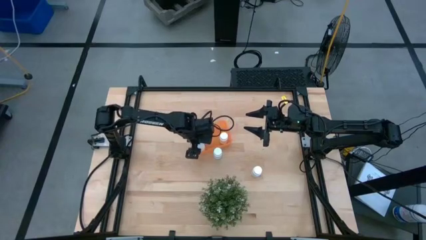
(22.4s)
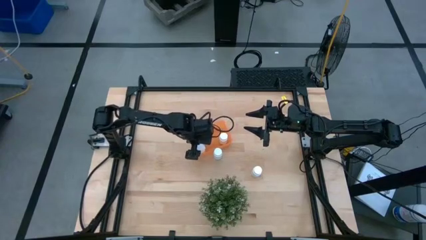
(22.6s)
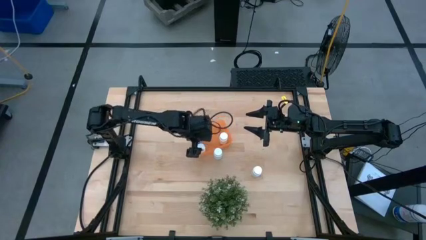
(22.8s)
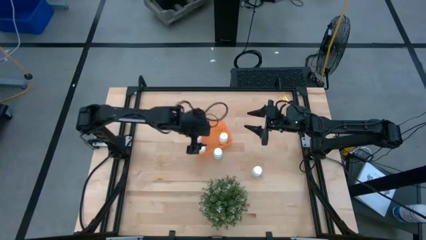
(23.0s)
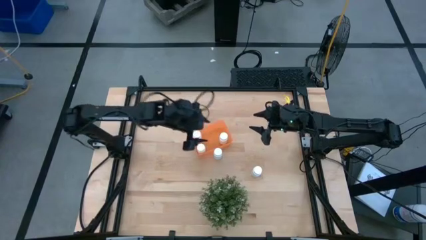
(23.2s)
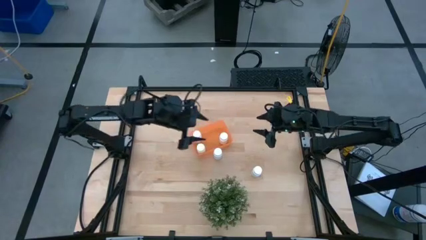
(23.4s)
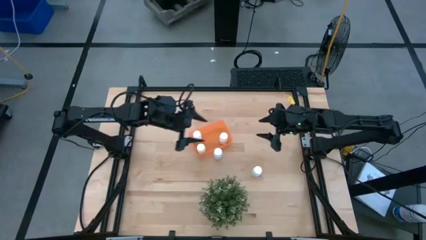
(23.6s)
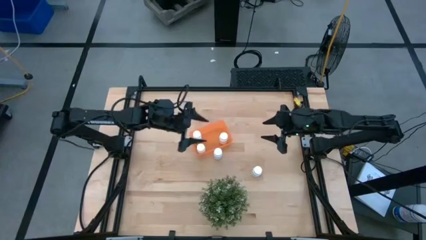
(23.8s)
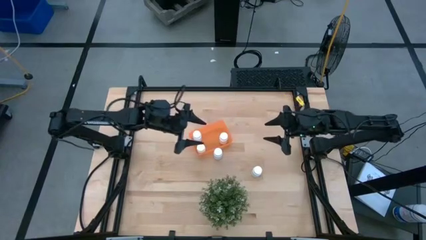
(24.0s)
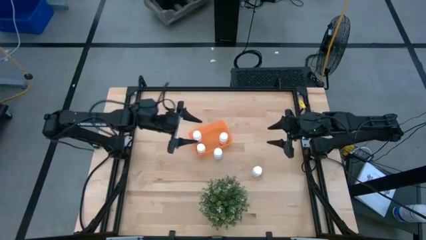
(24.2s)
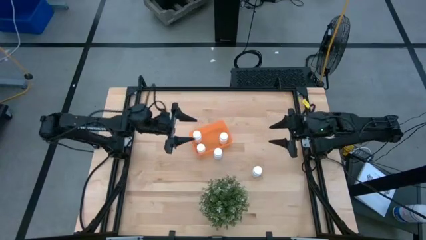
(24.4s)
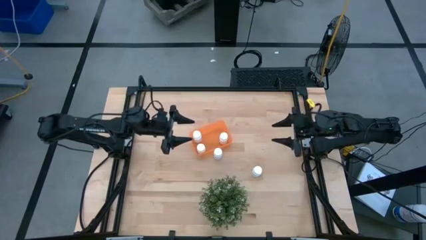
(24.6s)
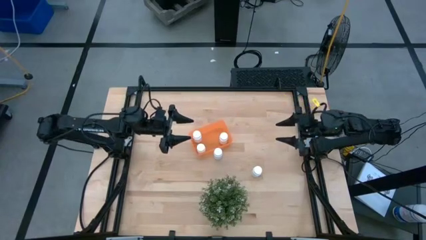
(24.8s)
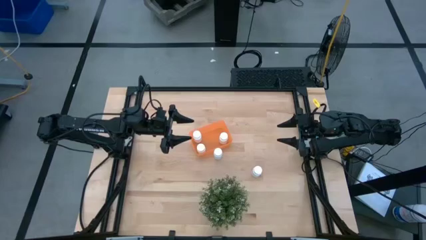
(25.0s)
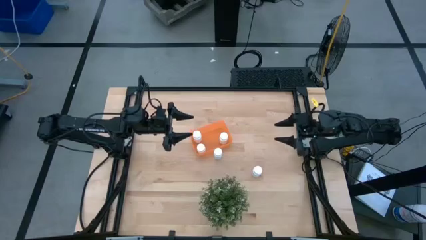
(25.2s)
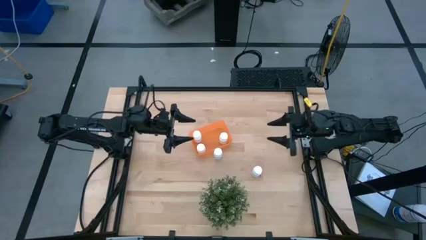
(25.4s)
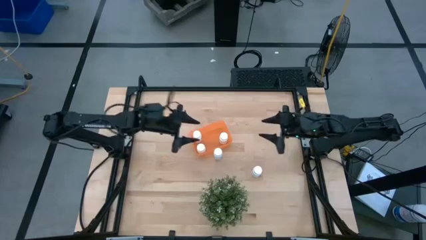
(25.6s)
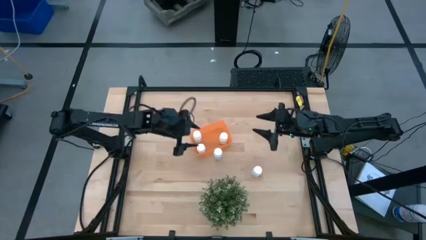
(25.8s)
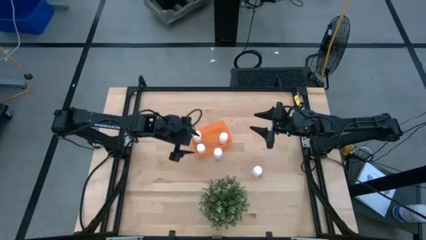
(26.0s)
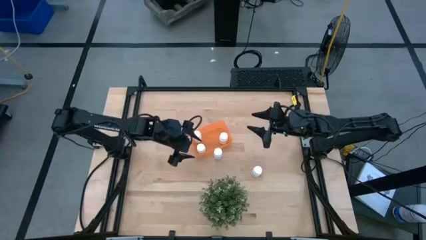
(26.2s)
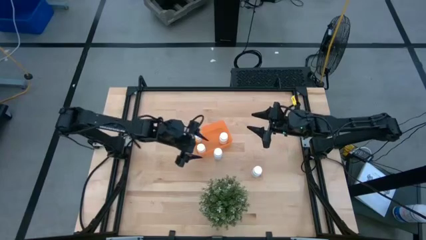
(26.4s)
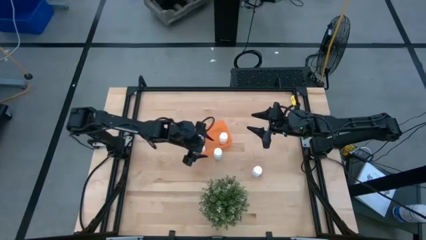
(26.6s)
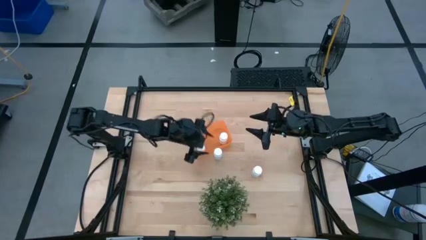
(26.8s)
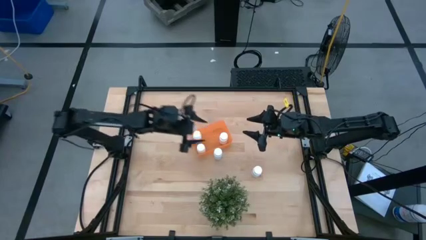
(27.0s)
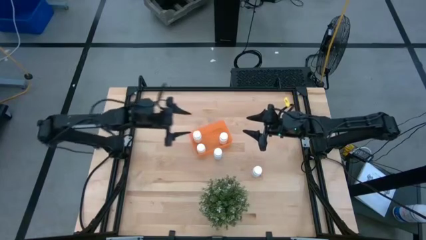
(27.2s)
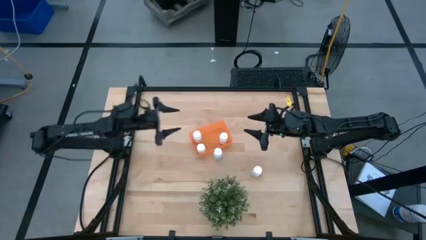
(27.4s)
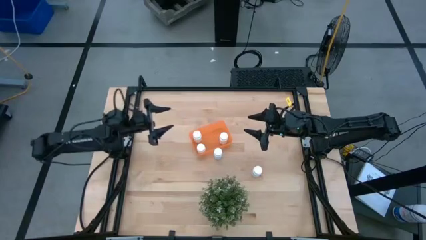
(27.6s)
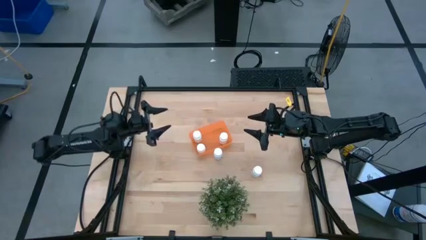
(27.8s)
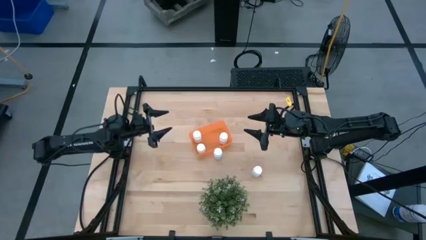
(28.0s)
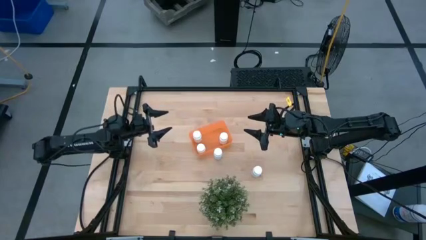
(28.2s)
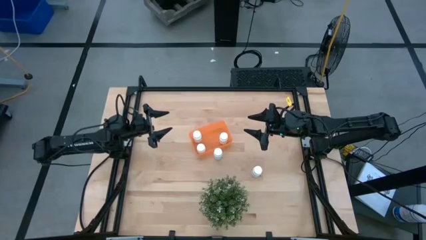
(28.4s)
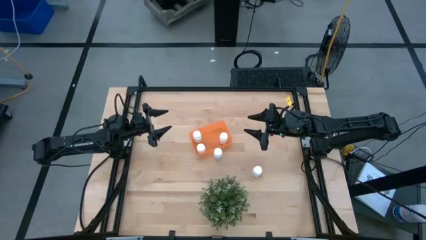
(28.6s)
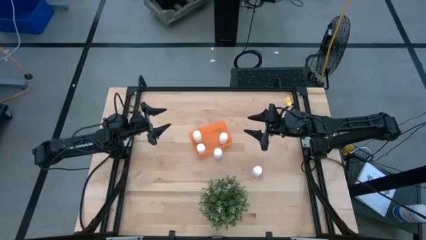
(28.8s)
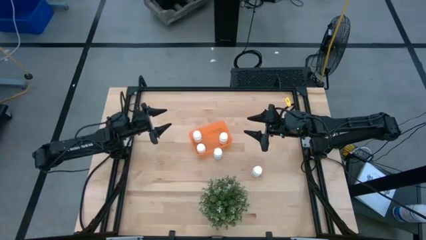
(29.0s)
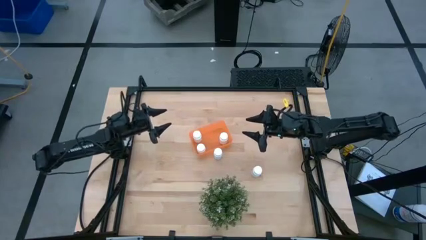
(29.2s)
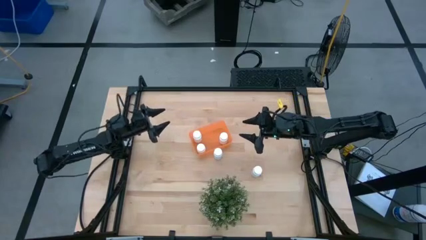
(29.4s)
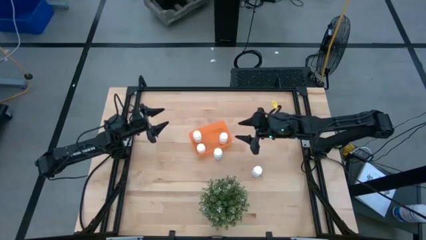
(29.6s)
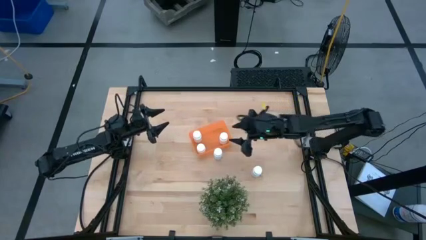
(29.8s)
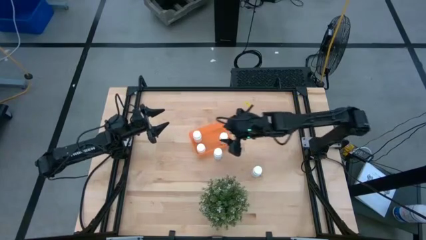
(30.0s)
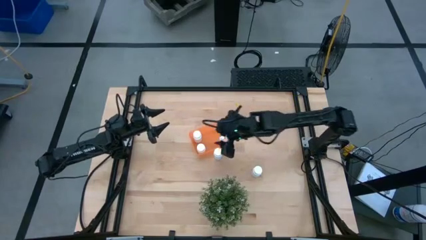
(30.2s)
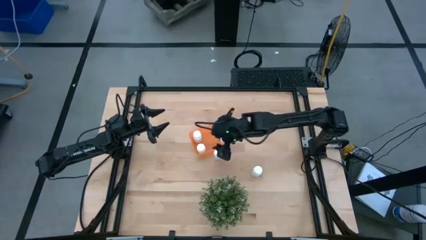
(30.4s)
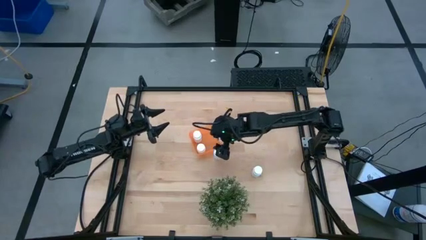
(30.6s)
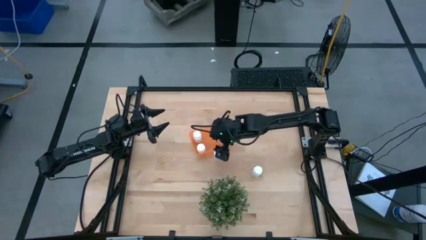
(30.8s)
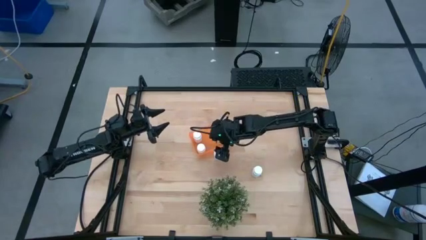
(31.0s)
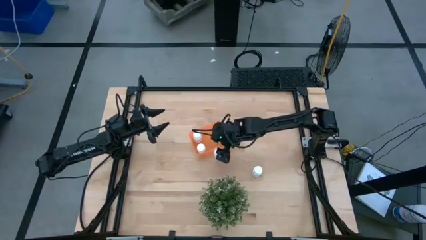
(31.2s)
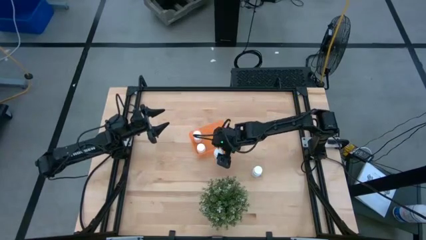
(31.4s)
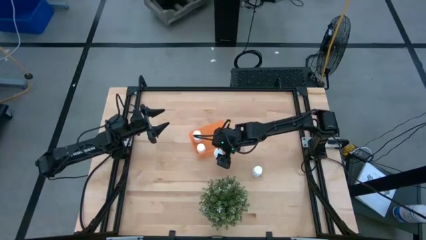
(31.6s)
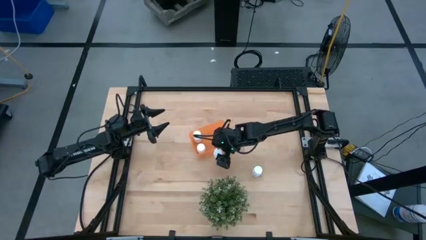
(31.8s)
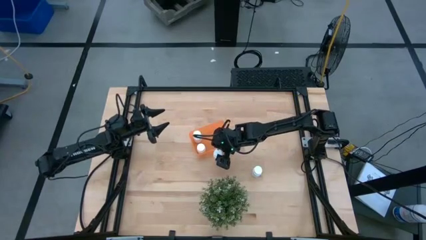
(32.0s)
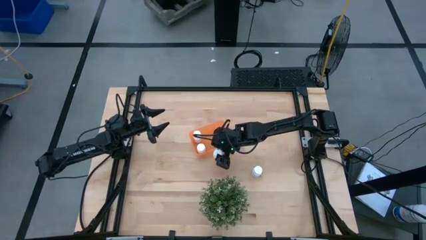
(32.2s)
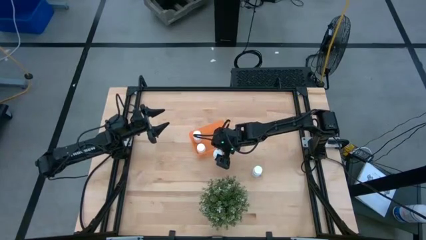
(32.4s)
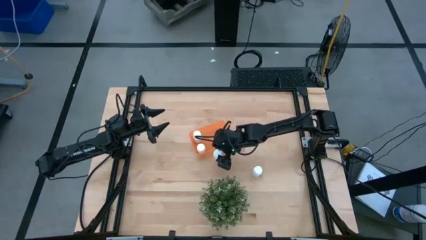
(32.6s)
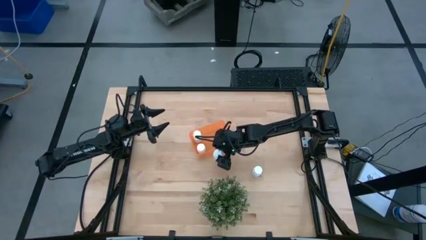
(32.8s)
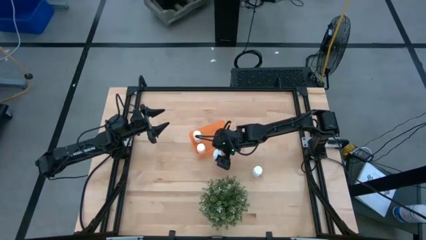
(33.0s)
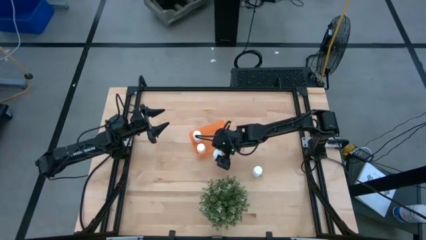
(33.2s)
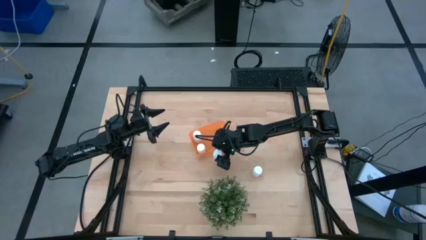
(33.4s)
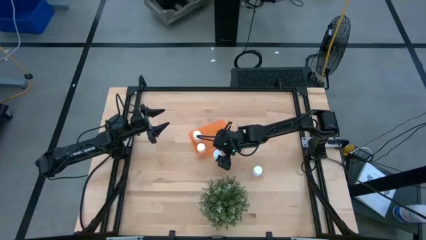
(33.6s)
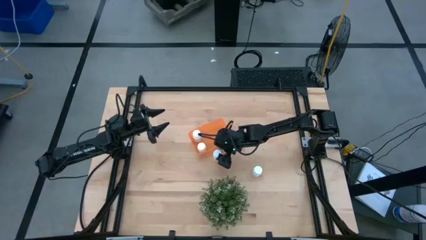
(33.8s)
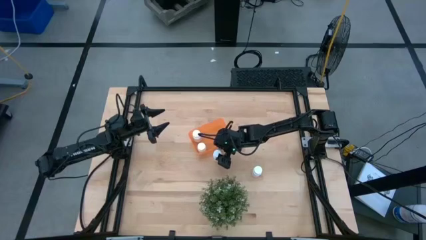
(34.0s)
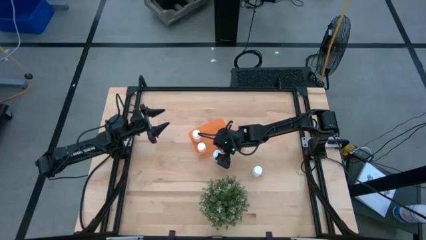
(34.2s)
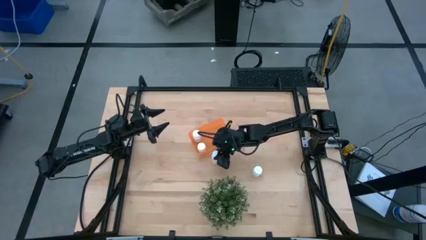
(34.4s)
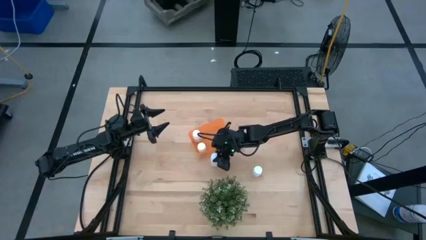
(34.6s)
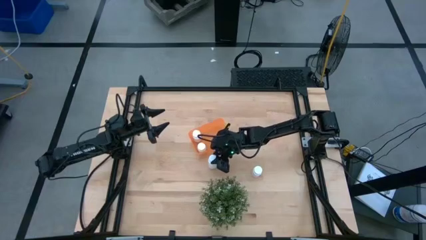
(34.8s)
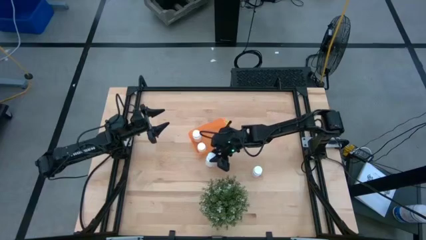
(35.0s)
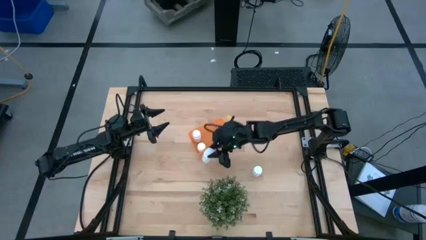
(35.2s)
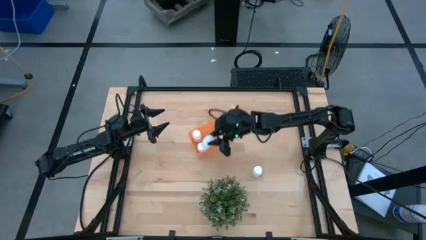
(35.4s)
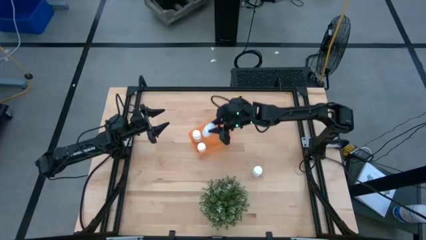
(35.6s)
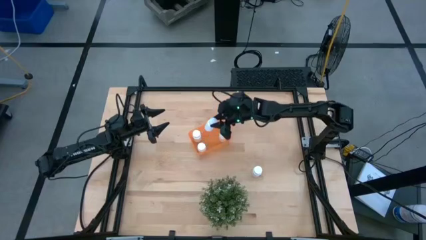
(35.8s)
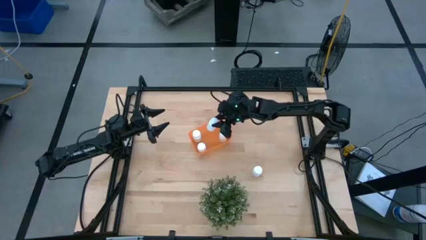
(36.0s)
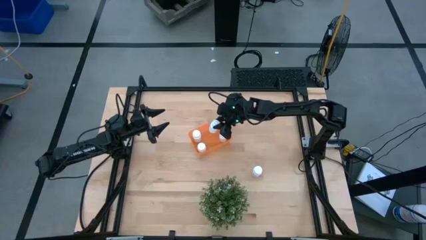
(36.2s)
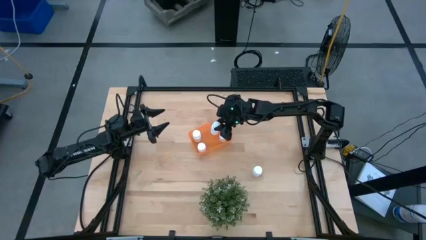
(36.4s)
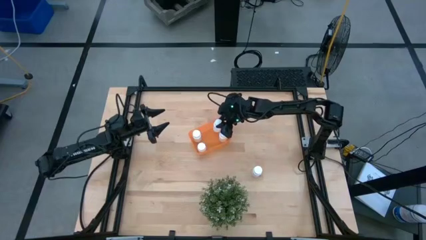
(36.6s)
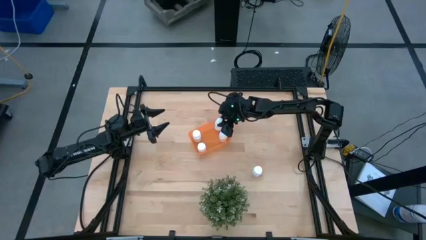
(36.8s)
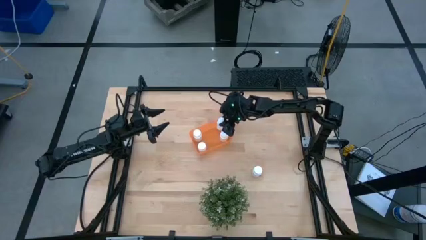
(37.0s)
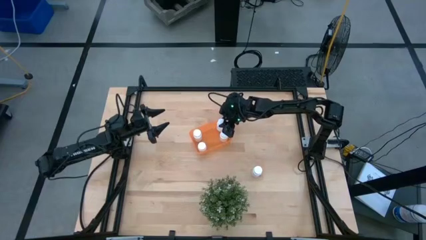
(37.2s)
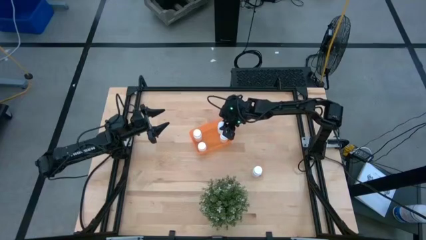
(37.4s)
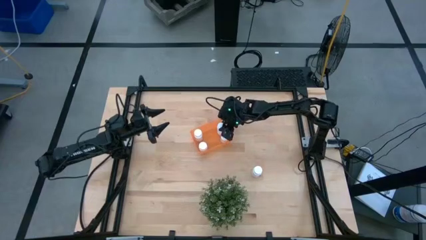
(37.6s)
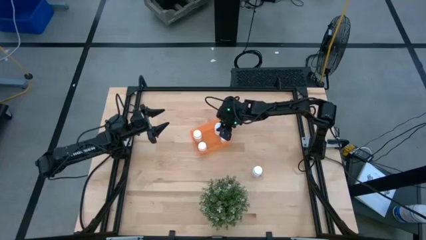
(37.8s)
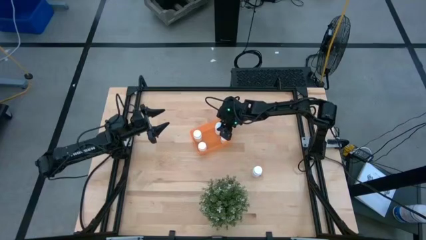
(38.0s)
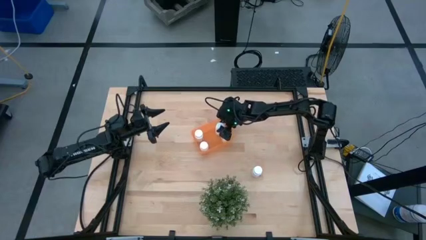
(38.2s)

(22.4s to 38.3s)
Task: Pick and place pill bottles into a basket
Put the white pill bottle into the orange bin

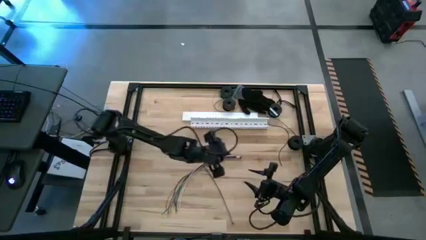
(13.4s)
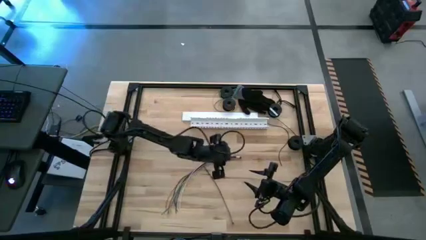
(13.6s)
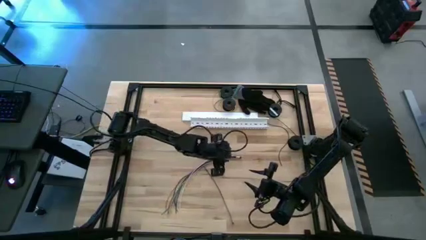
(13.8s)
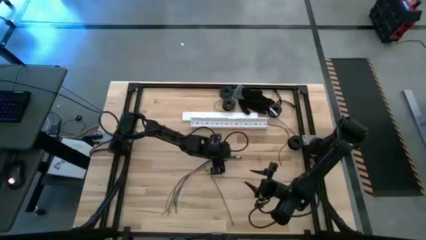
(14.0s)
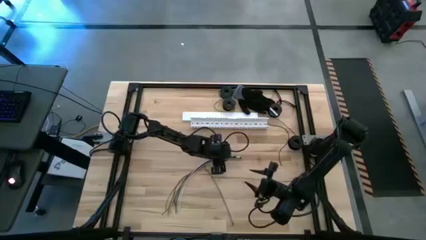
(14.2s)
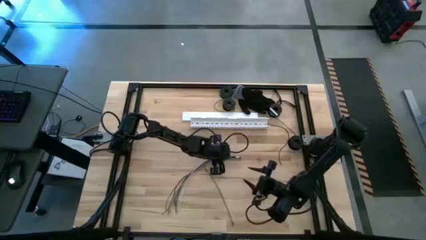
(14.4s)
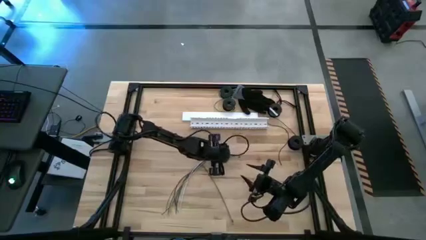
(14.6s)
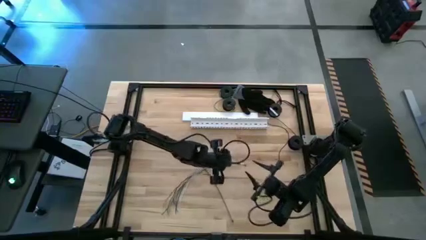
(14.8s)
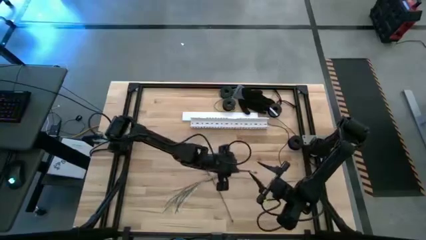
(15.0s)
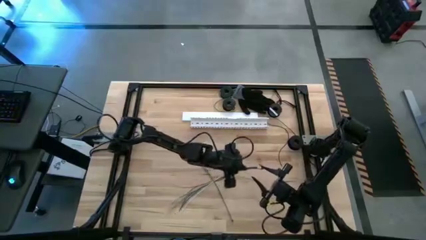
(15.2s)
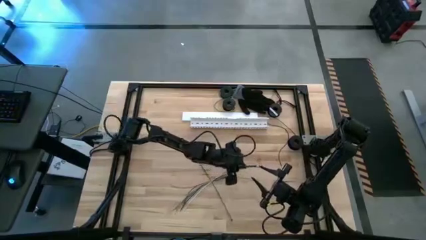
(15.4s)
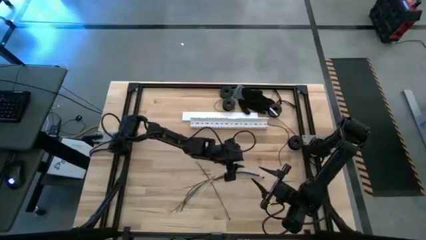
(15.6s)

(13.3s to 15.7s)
Task: Ziptie cables
Move the cables to the center of the table
